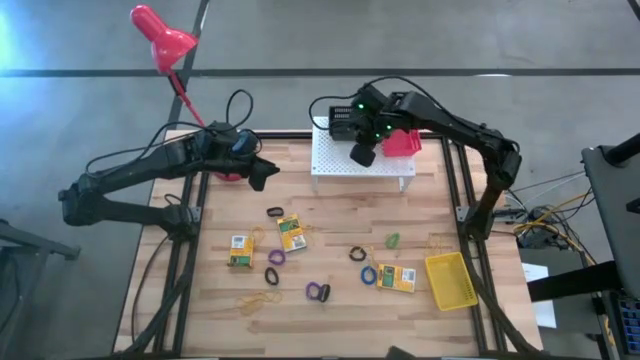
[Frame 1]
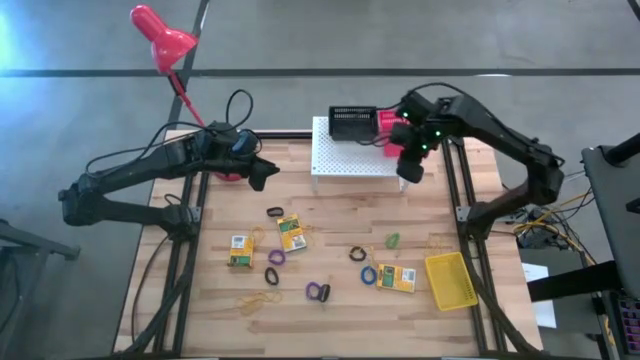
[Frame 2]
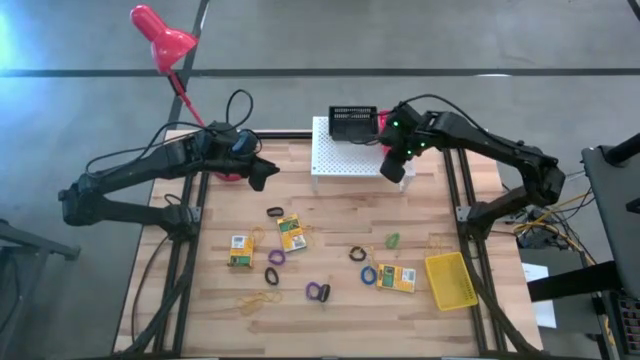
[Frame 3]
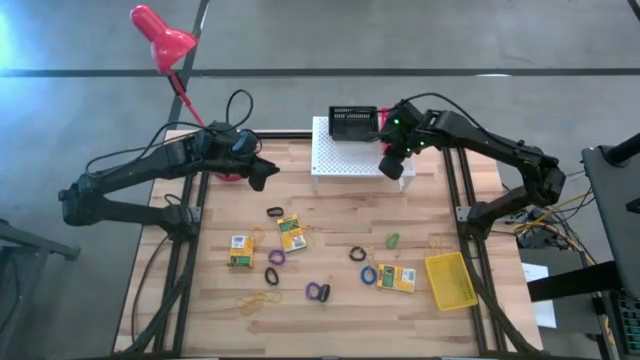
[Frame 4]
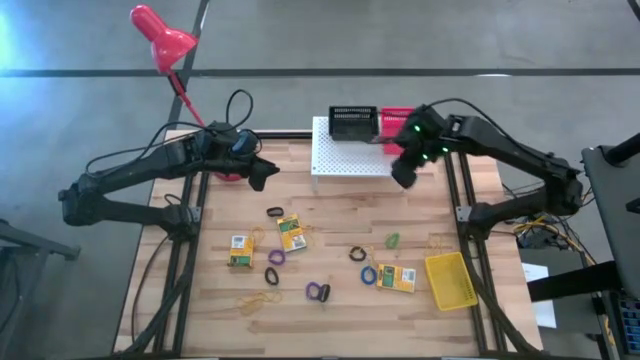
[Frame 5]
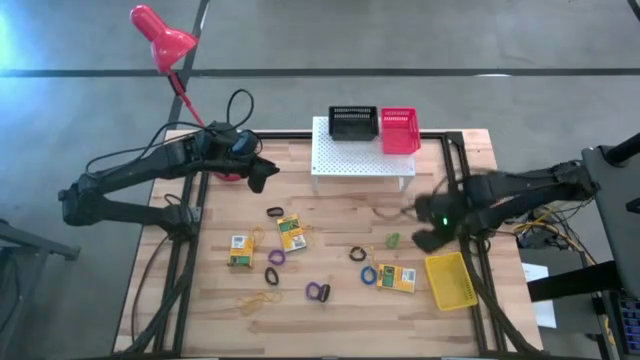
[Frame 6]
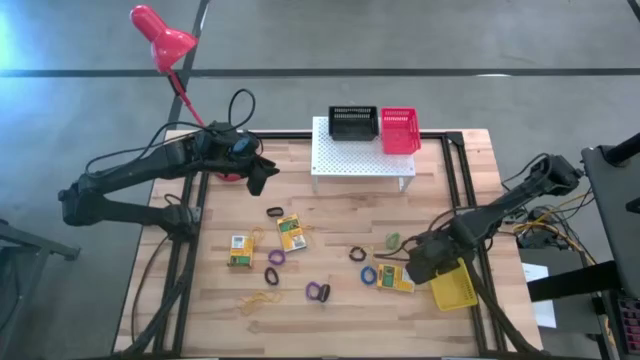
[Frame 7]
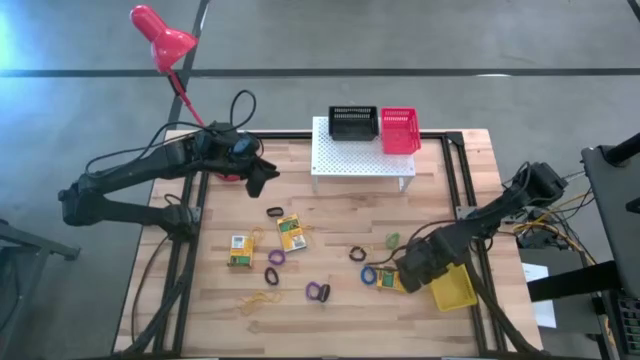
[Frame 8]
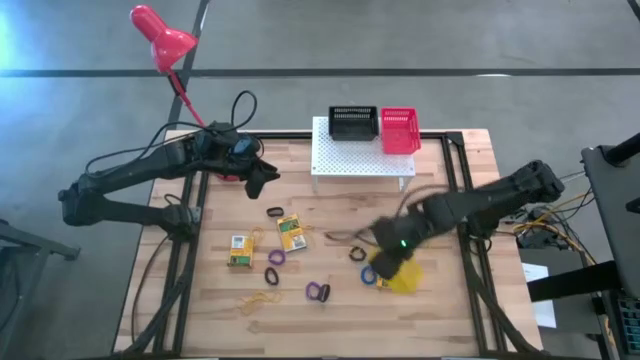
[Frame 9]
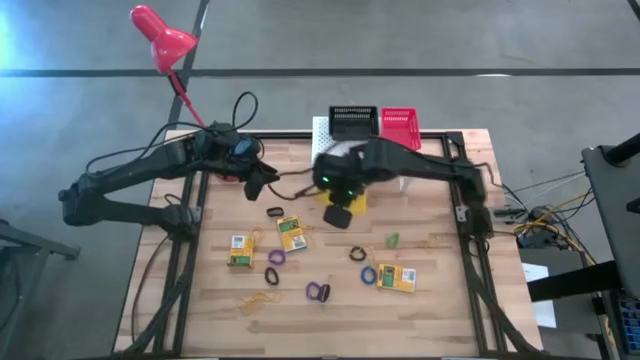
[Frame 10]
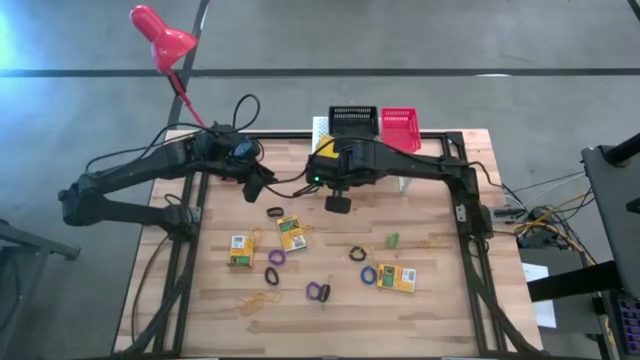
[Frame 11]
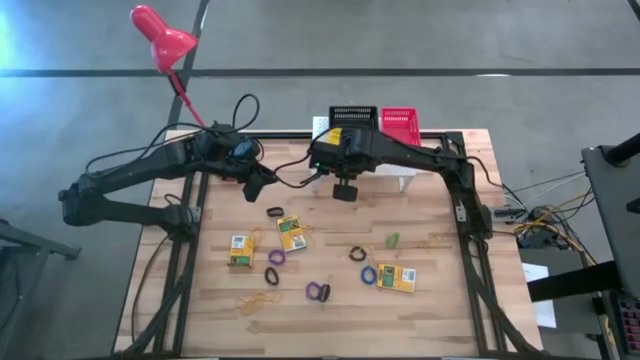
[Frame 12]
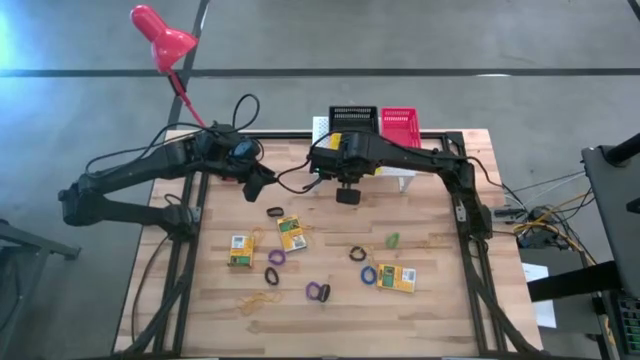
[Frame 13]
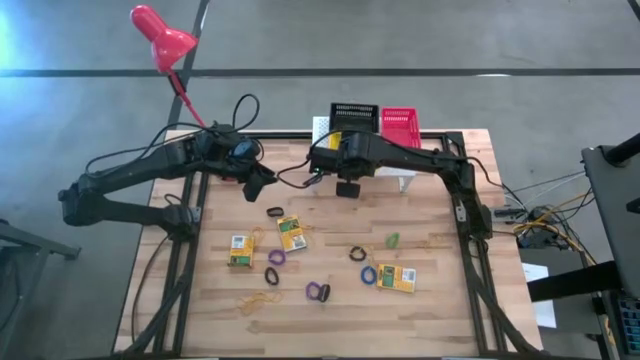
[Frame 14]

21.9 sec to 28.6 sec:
Task: Pick & Place Office Desk Supplies
Put the yellow bin on the shelf

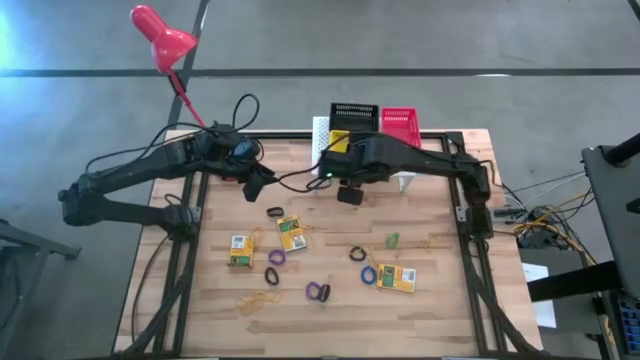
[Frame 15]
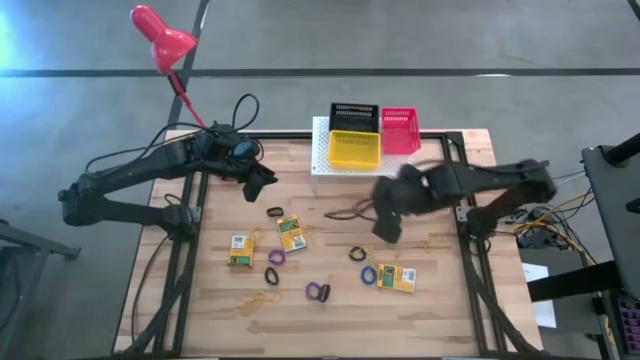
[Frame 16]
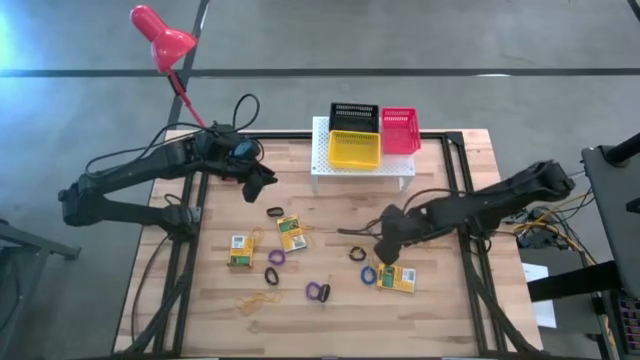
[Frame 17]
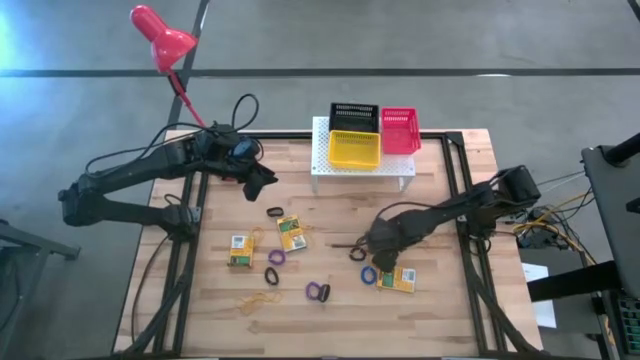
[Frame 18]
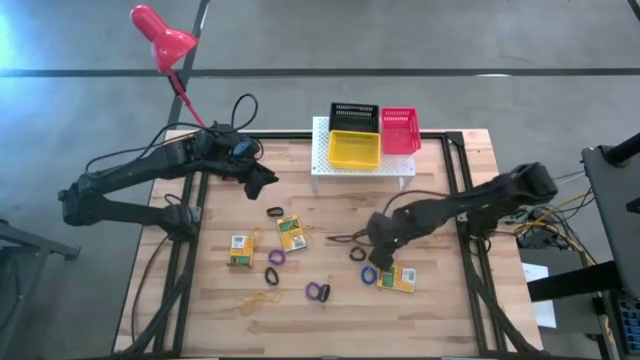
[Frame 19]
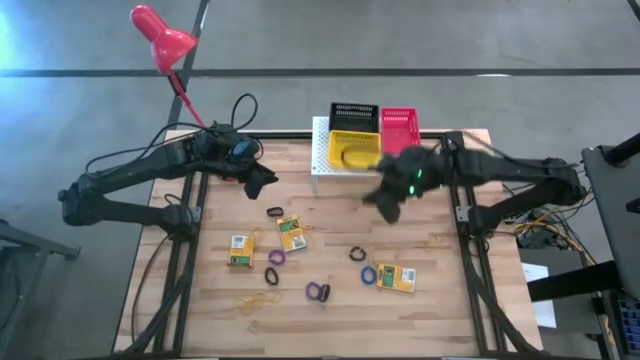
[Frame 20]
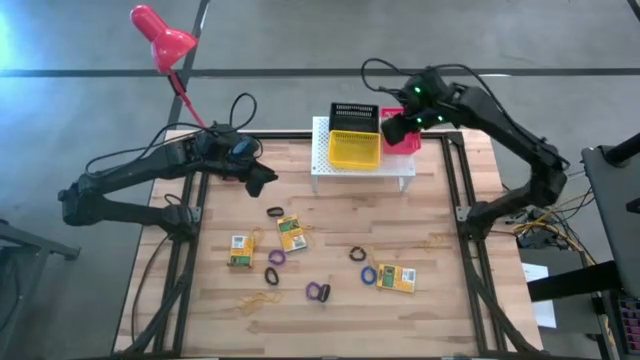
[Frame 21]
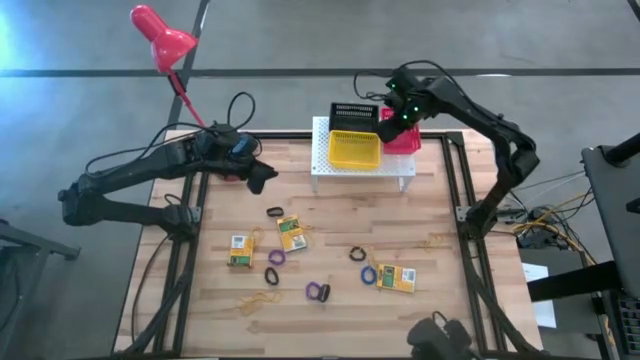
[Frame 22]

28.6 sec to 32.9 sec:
Put the green spring keychain in the red bin on the shelf

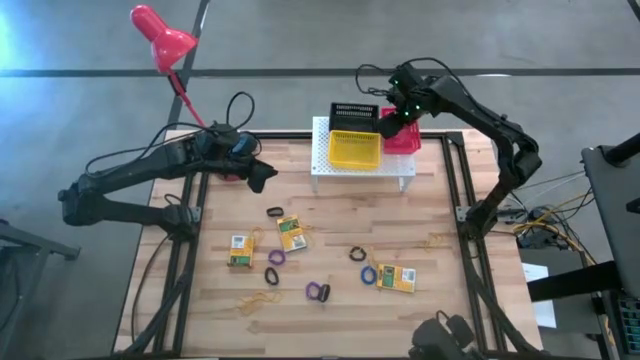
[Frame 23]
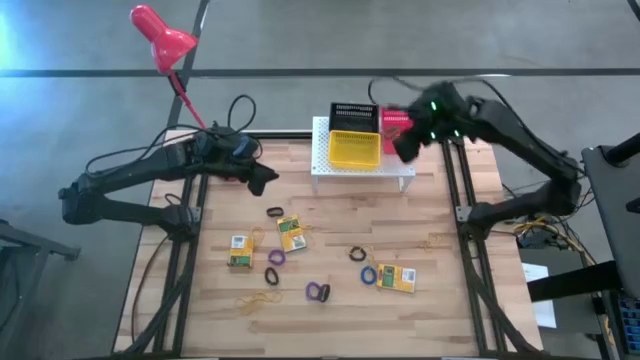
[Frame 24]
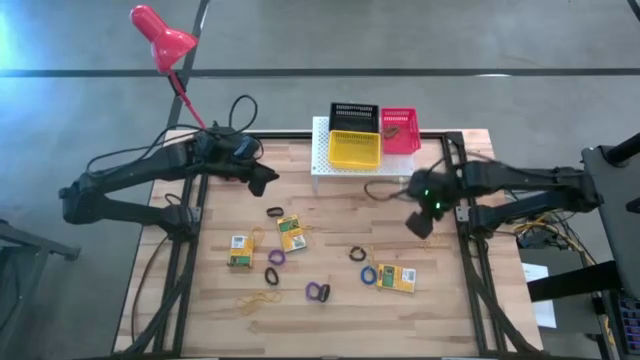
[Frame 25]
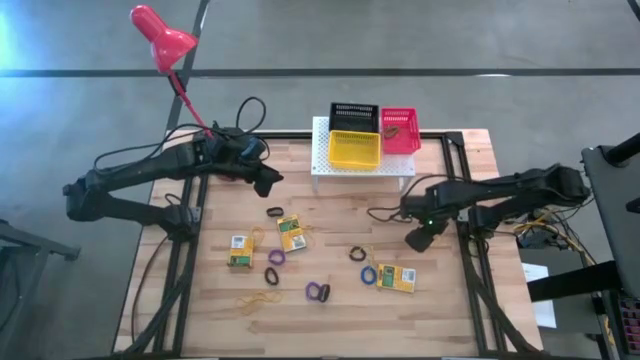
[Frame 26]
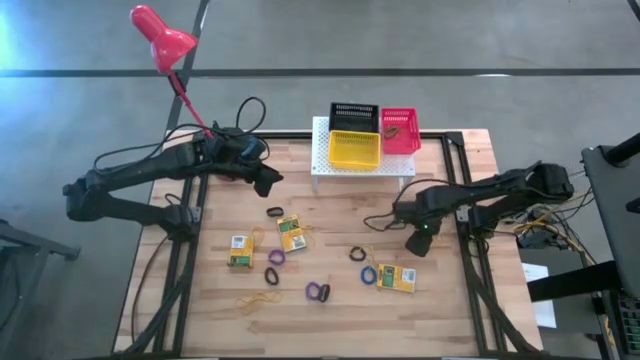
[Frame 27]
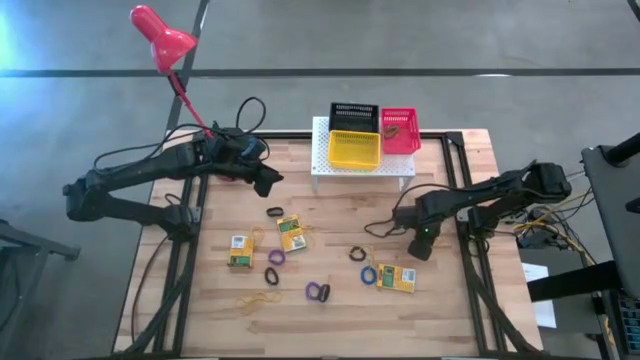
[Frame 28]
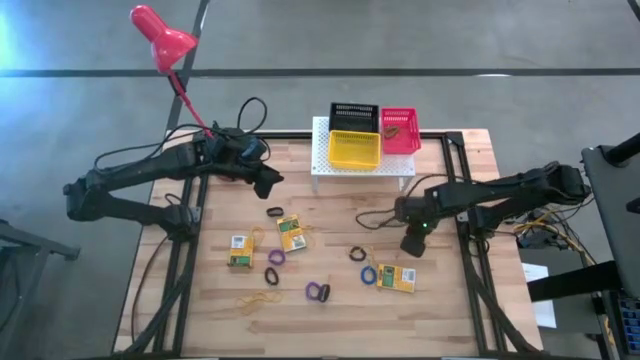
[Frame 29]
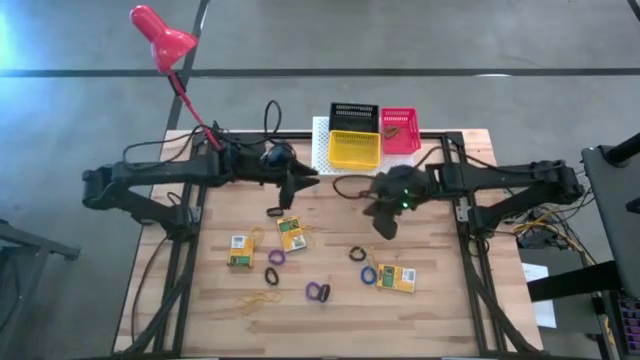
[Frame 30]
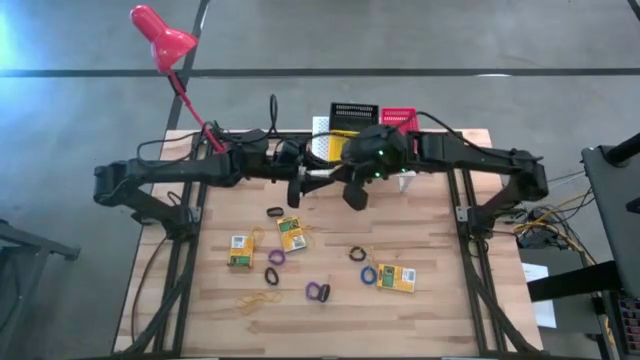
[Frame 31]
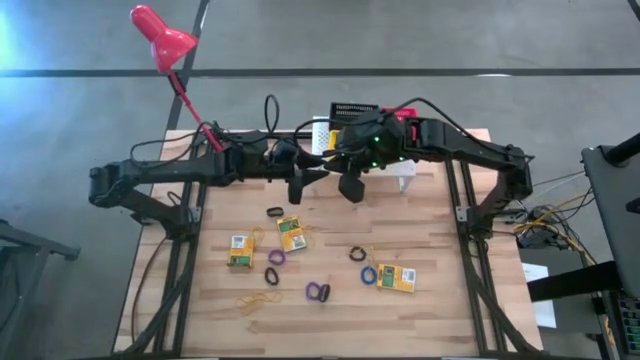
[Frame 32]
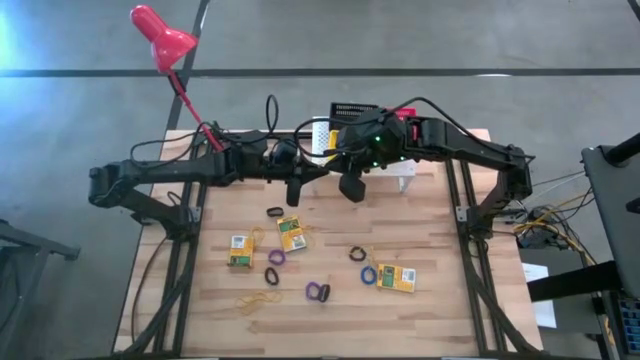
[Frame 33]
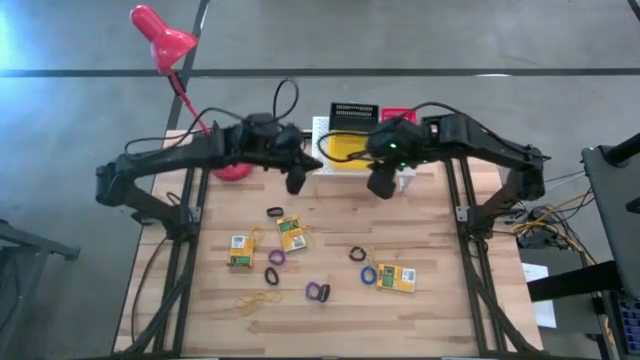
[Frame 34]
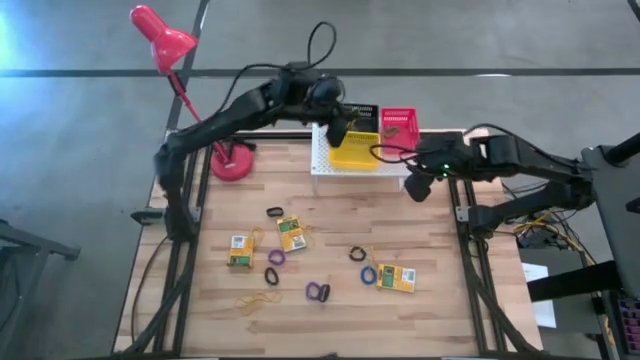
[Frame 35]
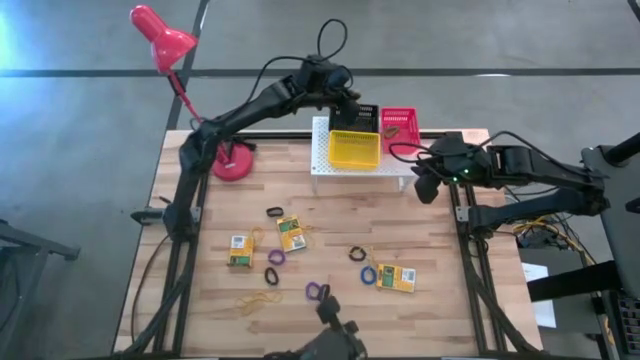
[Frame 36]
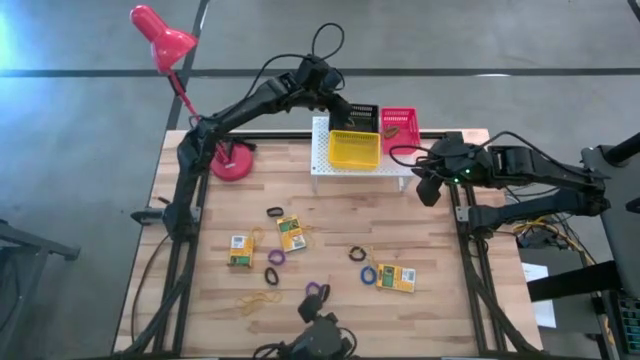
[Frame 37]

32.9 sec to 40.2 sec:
Put the yellow rubber band in the black bin on the shelf

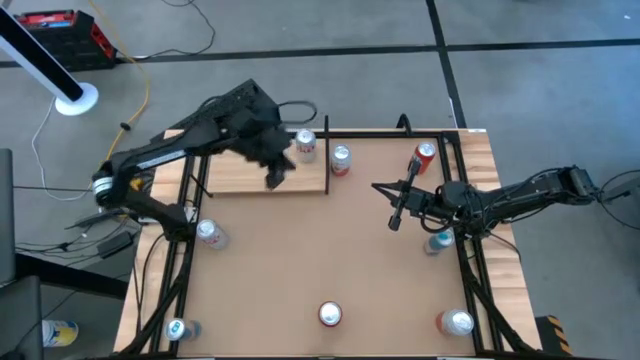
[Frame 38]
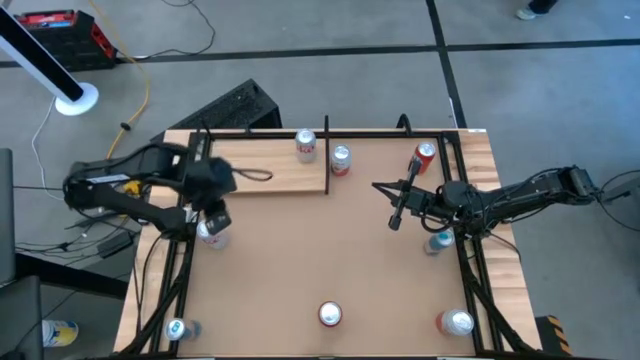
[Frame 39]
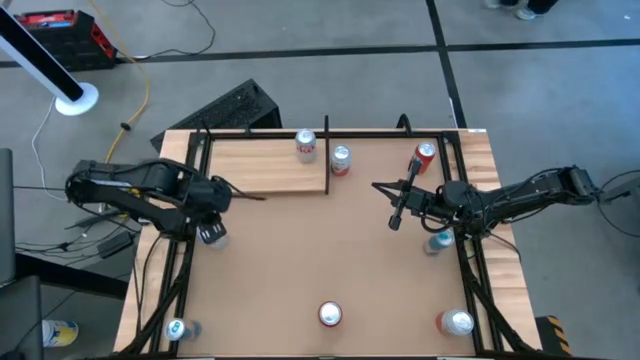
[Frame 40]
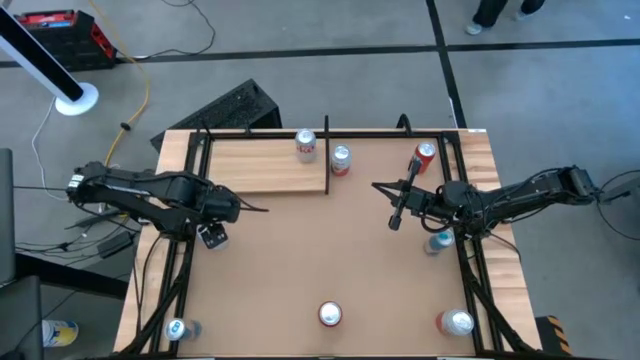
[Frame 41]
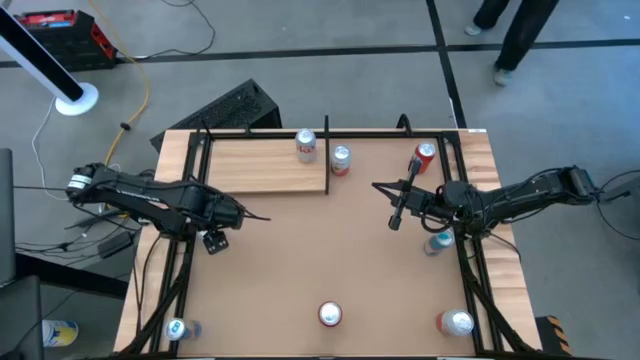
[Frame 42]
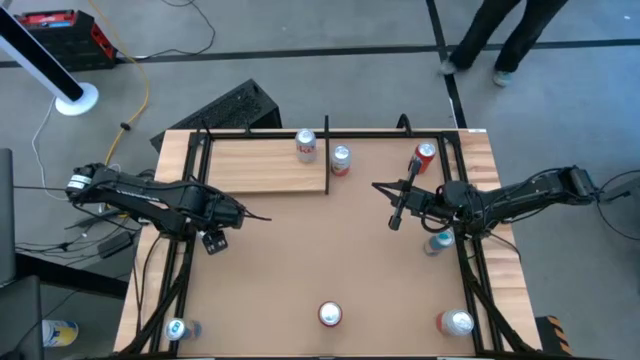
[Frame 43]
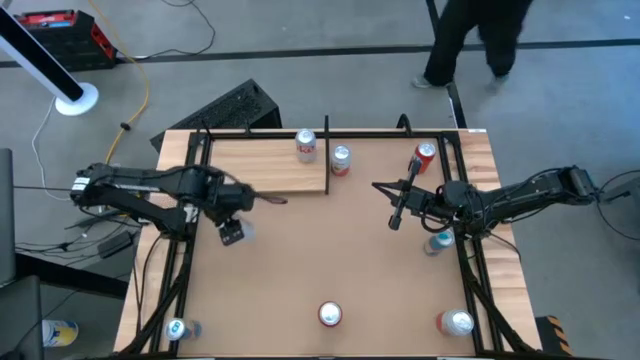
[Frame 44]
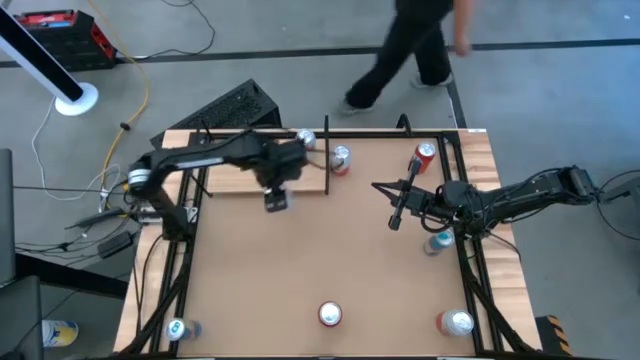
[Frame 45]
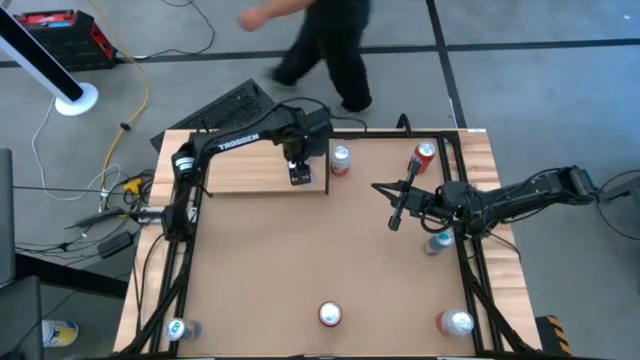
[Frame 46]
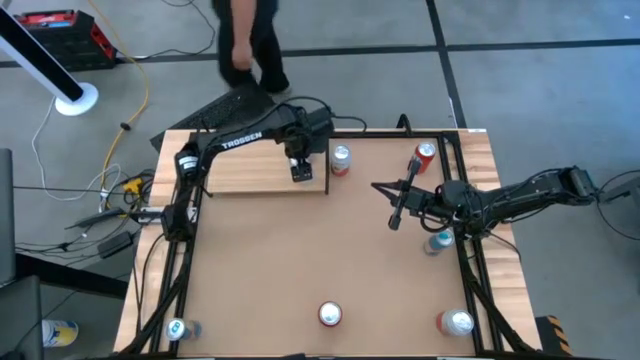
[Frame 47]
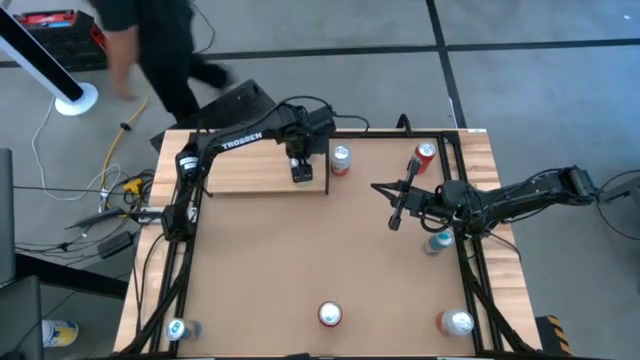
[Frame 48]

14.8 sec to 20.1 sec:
Task: Place canned beverage on shelf
Put the red-silver soda can on the shelf aligned with the other red-silver soda can
